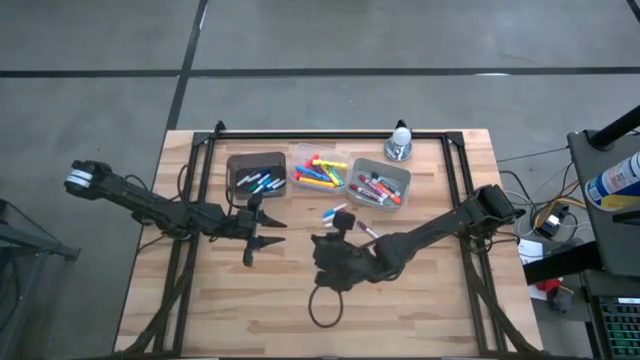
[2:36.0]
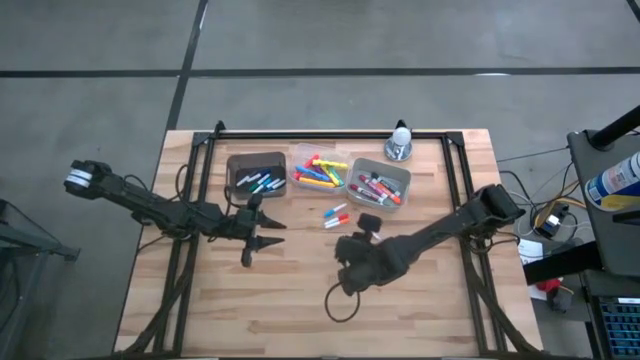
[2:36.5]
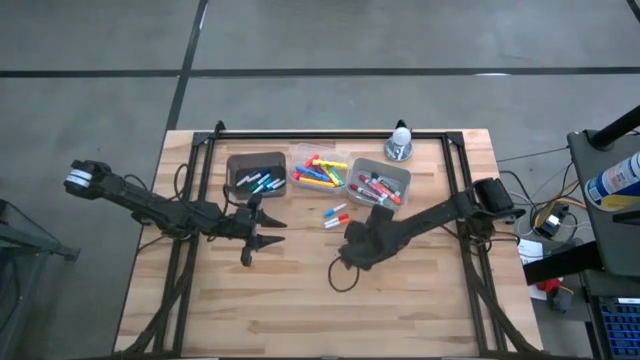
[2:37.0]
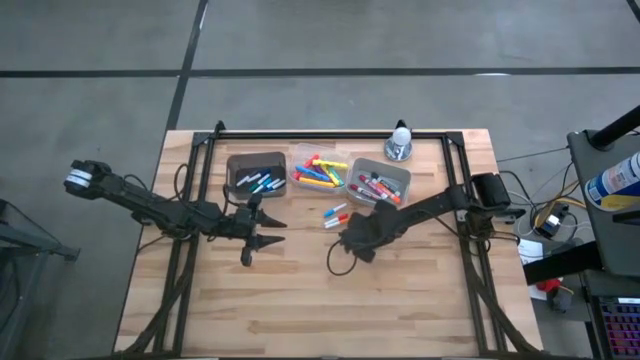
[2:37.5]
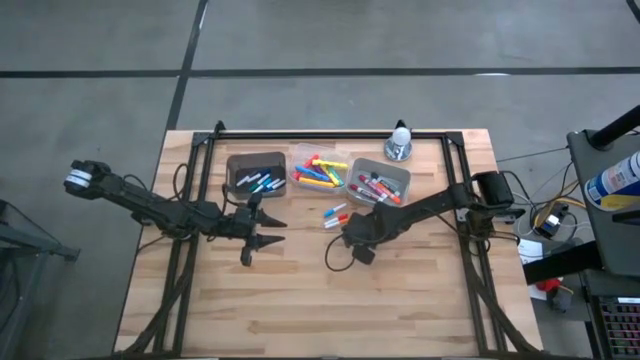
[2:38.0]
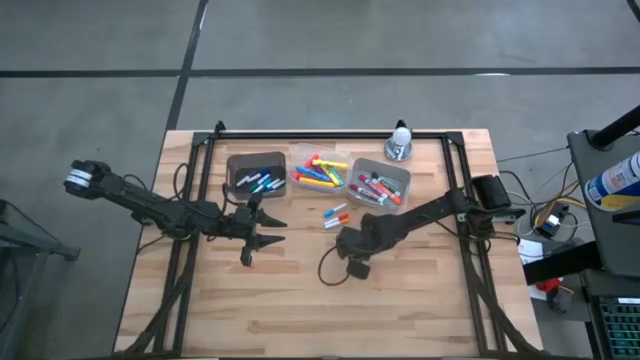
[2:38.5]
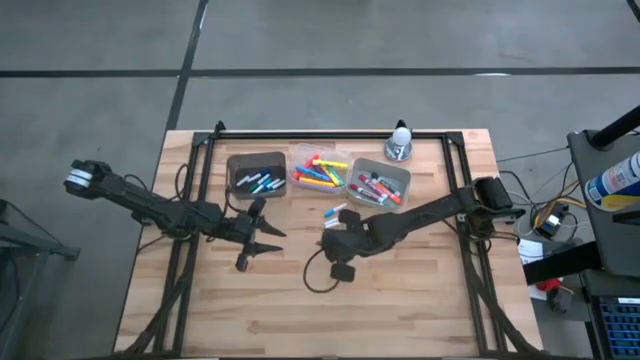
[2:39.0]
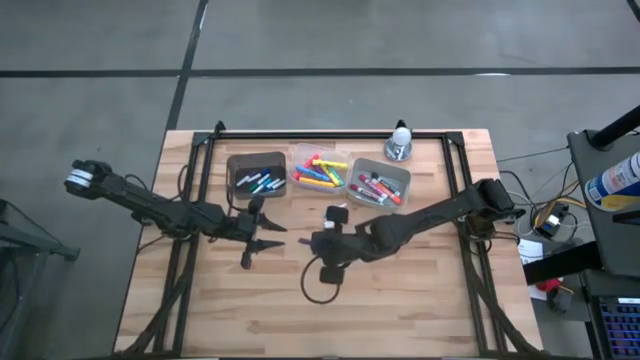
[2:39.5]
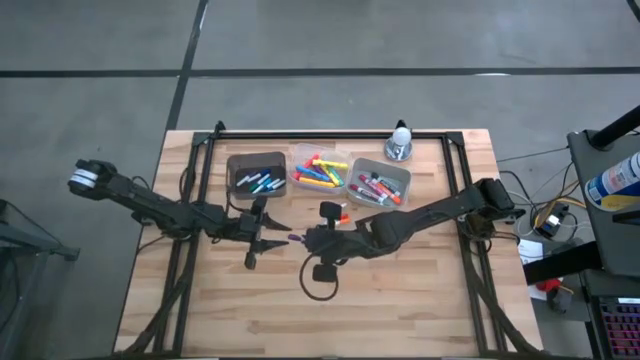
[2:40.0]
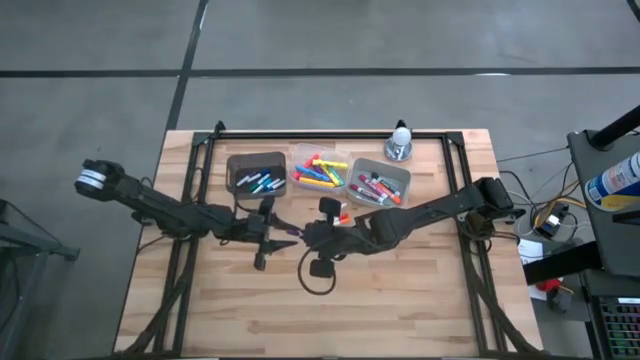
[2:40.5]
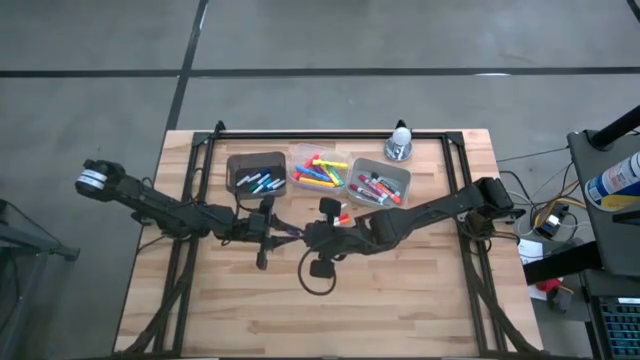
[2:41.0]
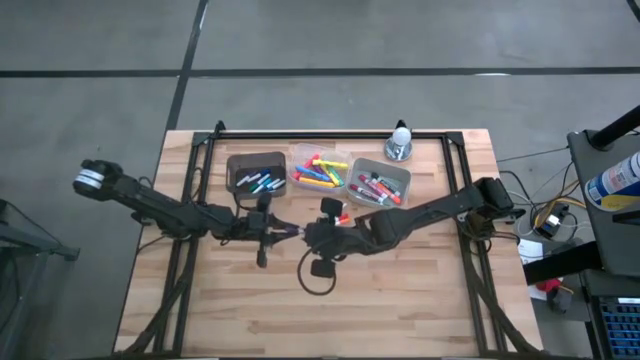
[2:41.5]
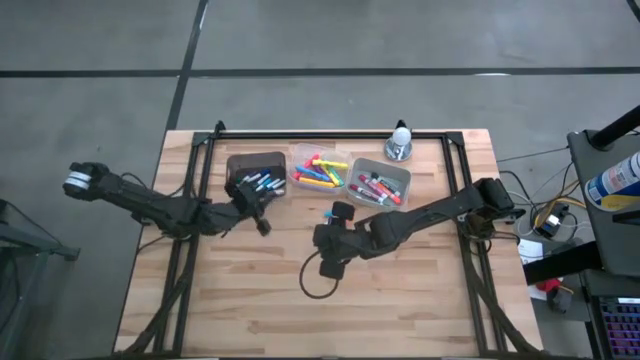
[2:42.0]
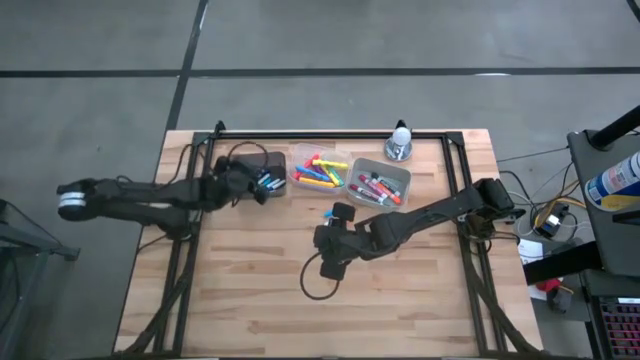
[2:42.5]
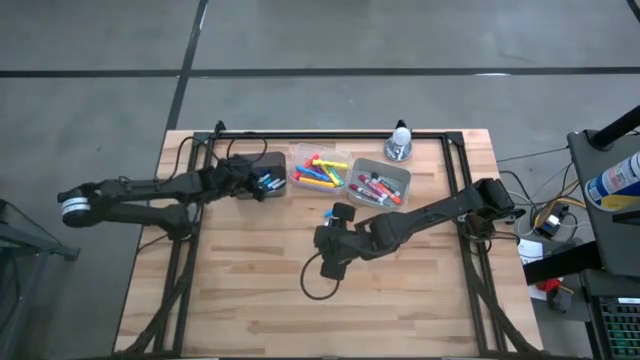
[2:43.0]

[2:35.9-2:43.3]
Task: Pick & Place Markers
Put the blue mini marker into the black bin

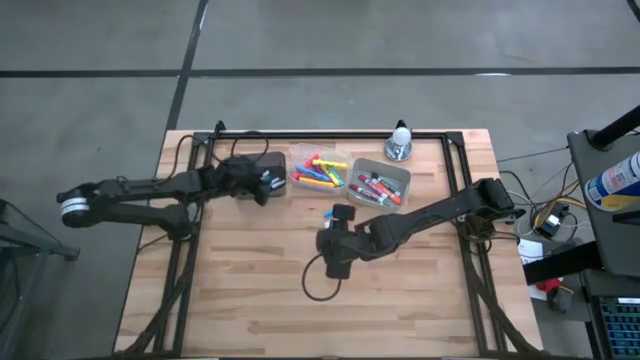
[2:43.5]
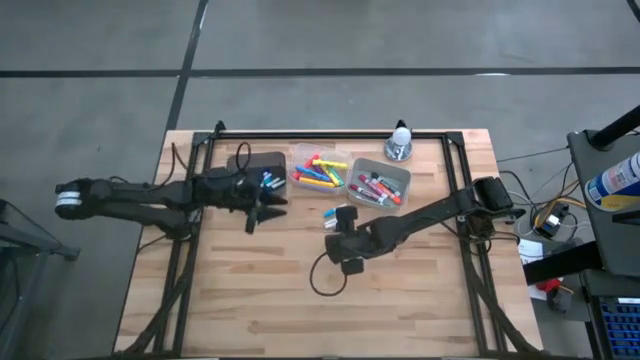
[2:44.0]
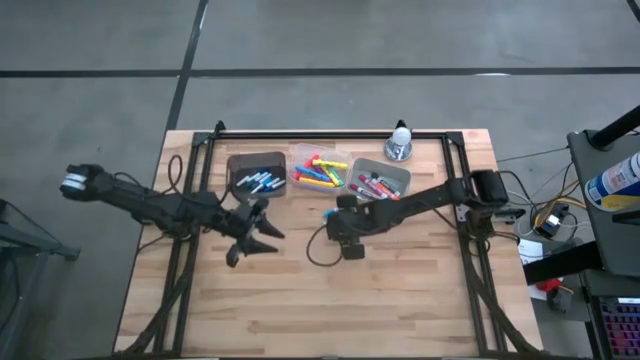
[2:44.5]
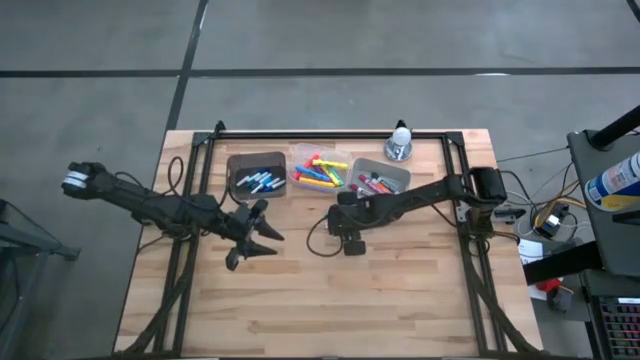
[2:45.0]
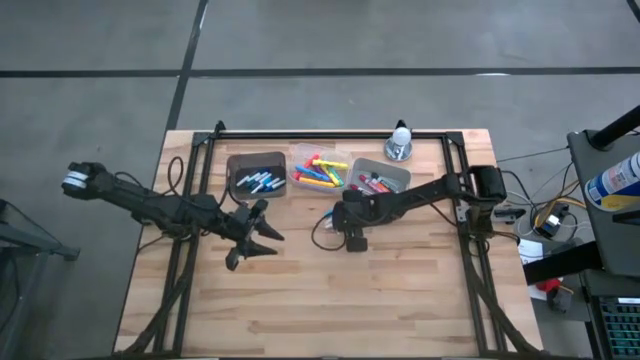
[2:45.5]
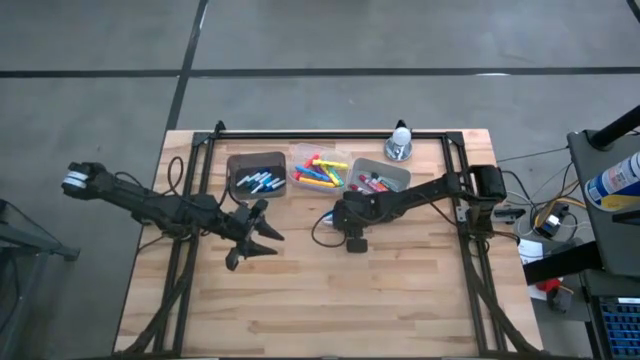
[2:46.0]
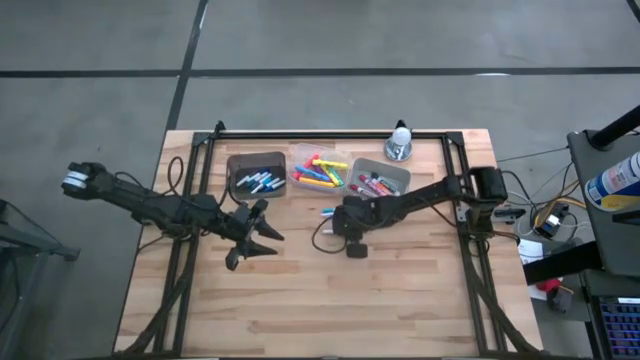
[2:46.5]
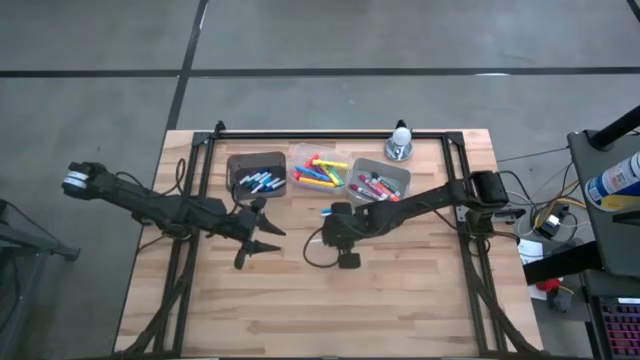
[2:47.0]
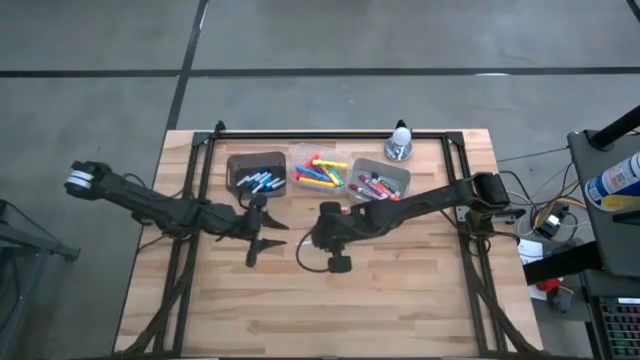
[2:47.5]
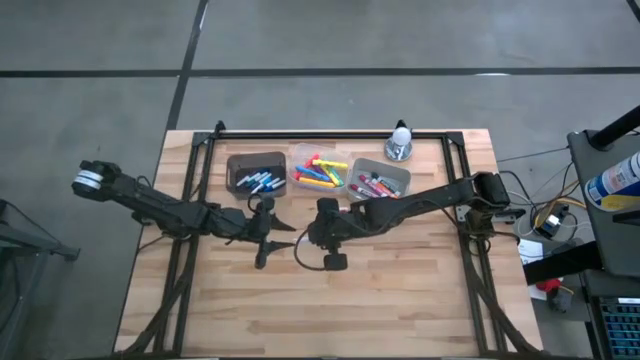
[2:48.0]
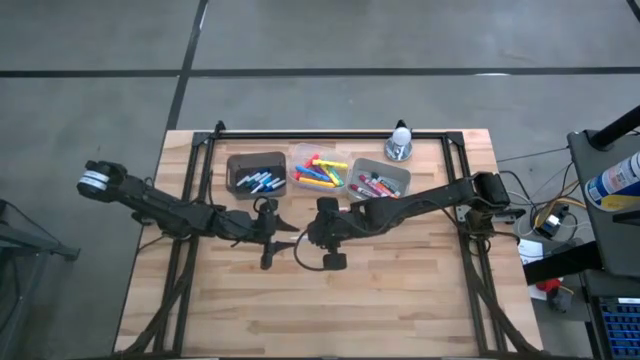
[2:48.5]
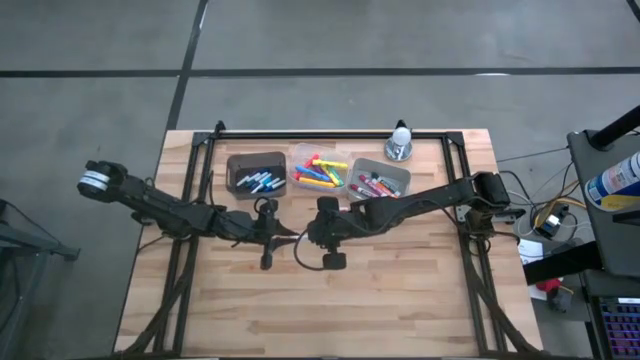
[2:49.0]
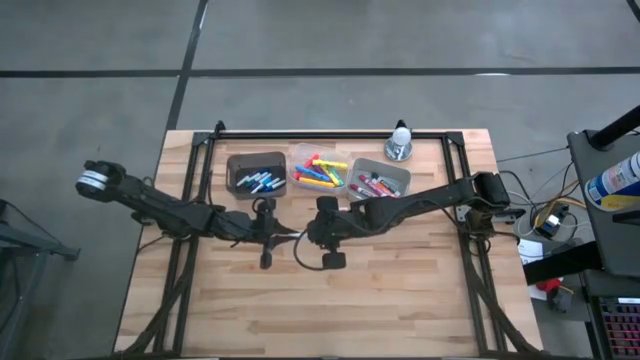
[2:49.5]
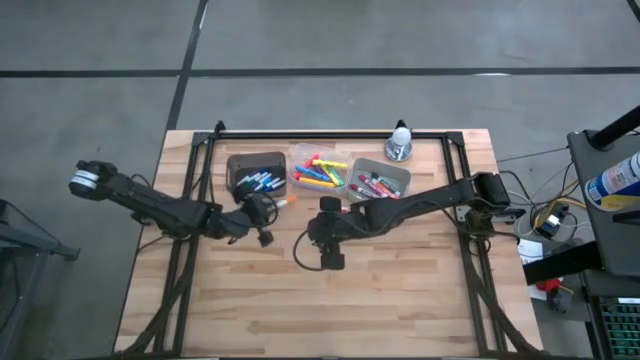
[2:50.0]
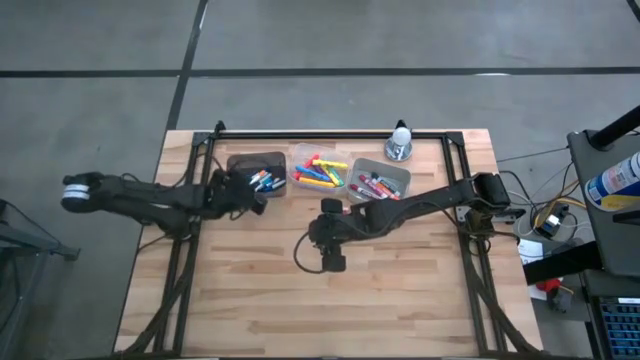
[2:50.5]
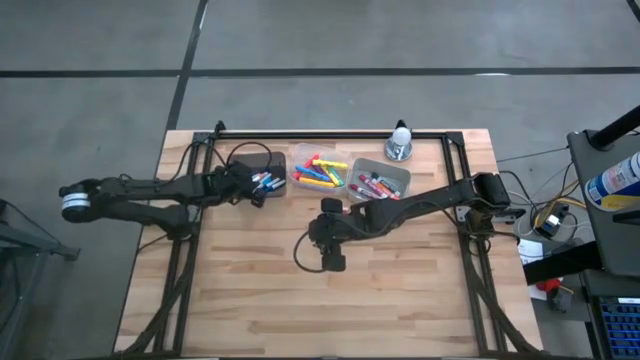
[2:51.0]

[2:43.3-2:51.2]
Put the orange mini marker into the black bin

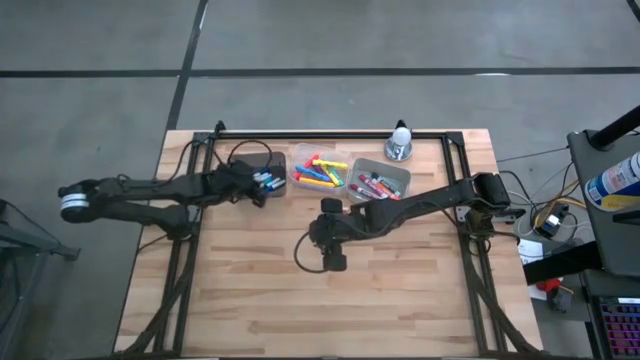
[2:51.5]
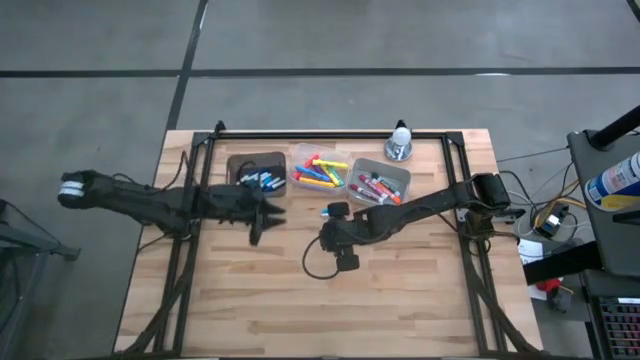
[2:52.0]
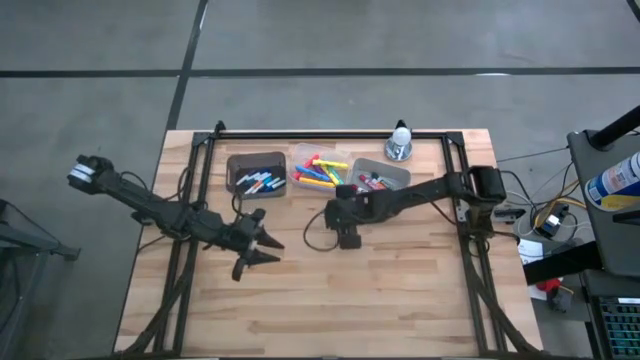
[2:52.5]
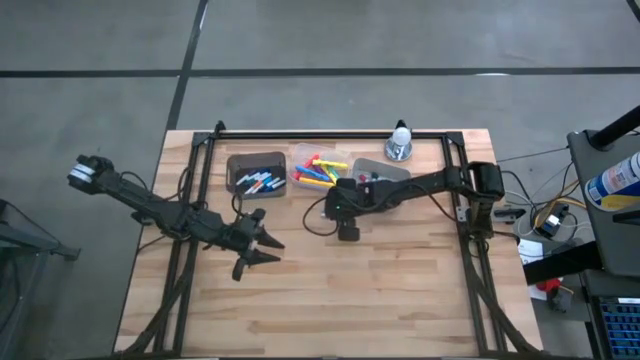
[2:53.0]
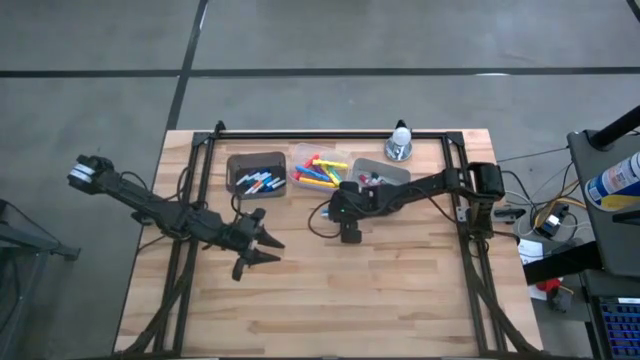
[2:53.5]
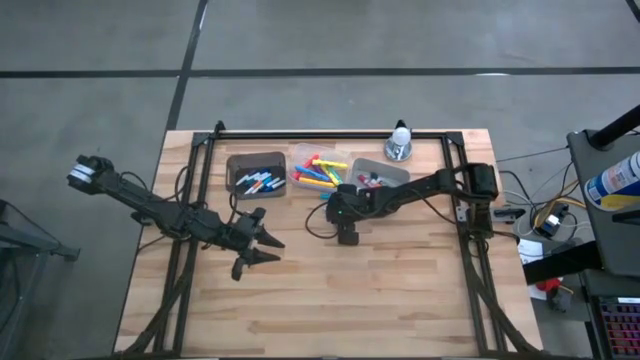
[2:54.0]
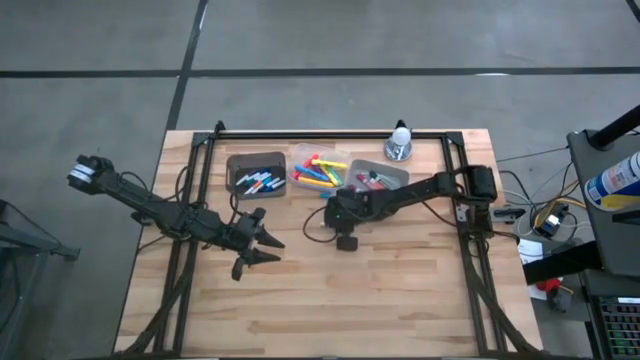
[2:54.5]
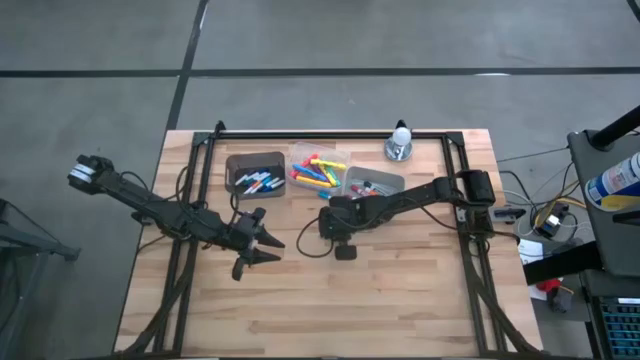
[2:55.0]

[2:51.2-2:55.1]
Put the red mini marker into the black bin

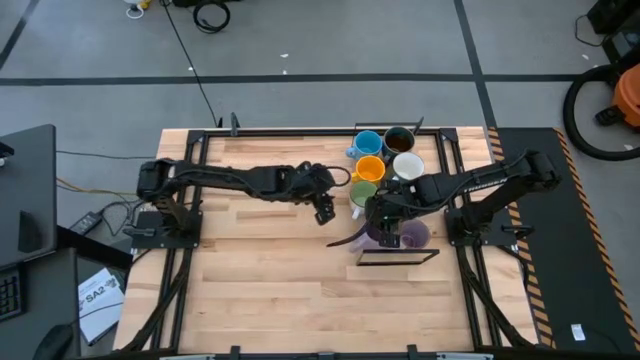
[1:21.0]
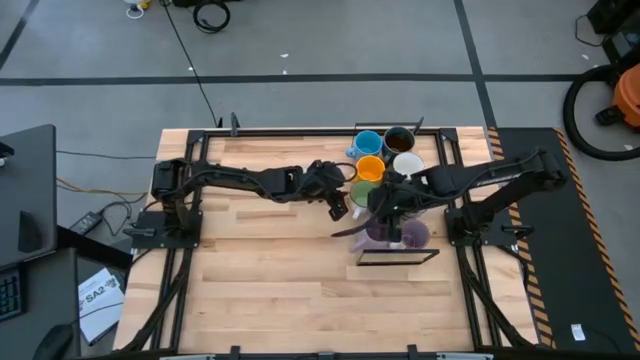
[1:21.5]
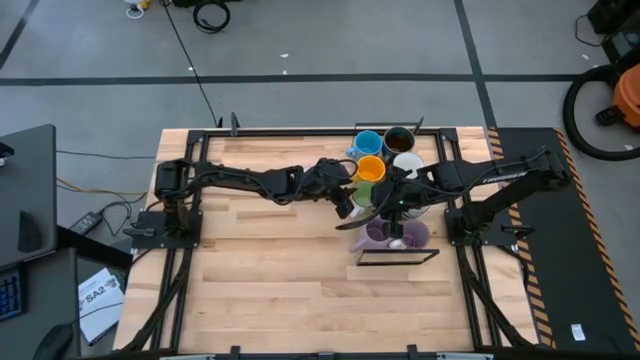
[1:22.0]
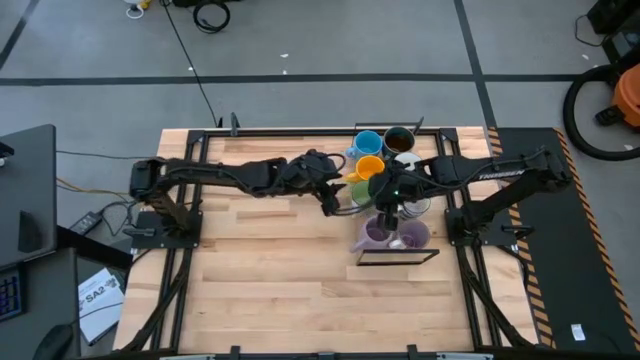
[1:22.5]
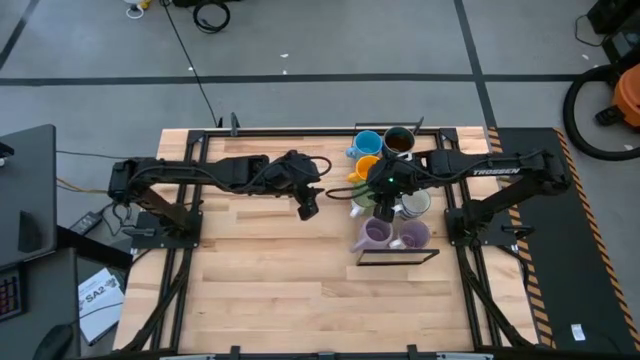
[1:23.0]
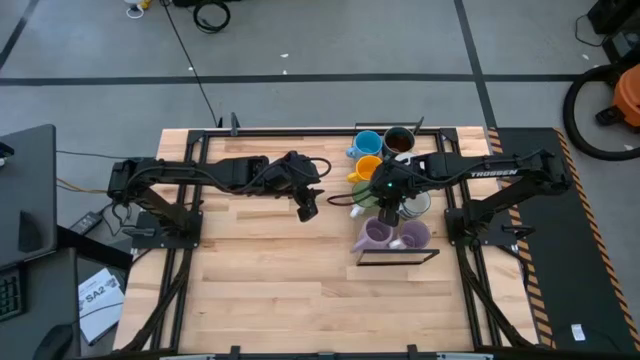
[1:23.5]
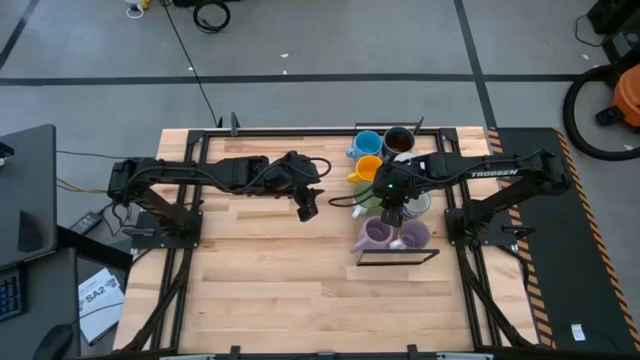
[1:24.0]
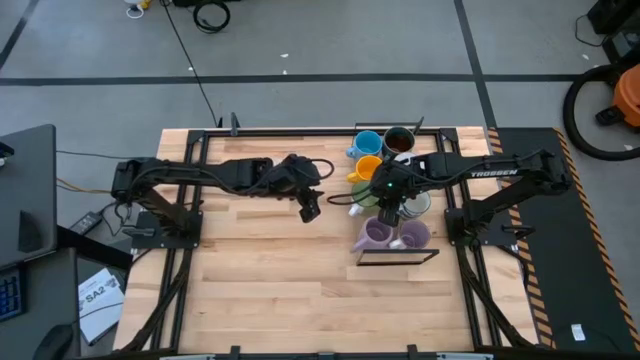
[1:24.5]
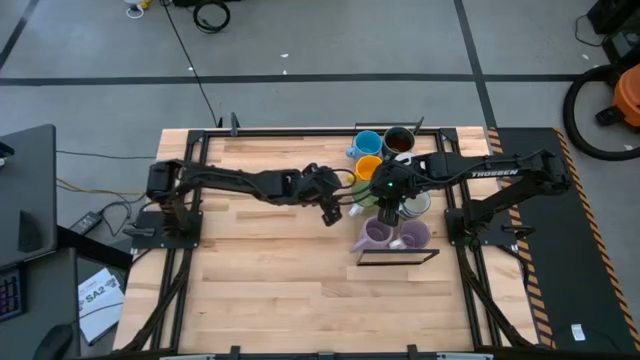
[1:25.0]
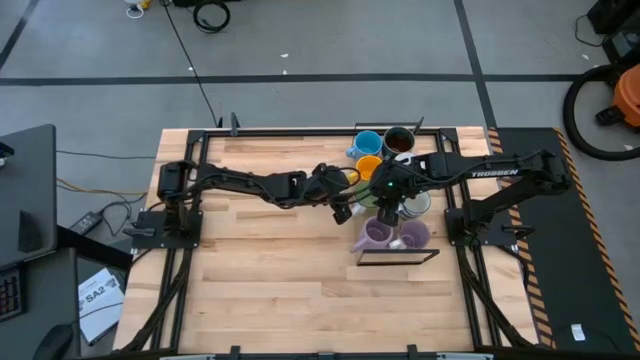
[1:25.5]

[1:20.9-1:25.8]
Task: Place coffee mugs
Adjust the green mug on the shelf
